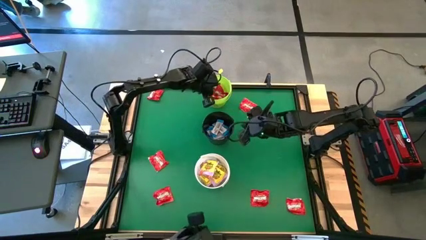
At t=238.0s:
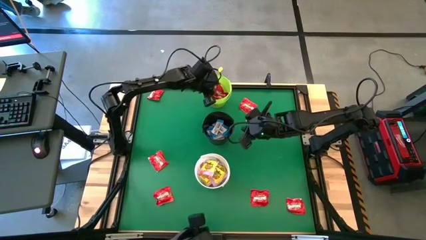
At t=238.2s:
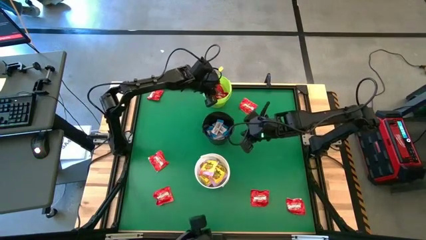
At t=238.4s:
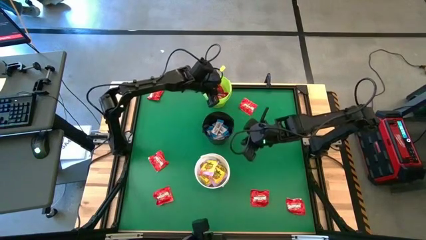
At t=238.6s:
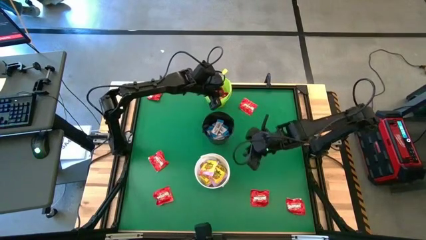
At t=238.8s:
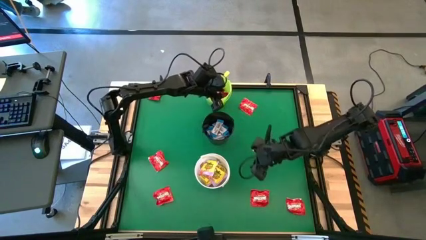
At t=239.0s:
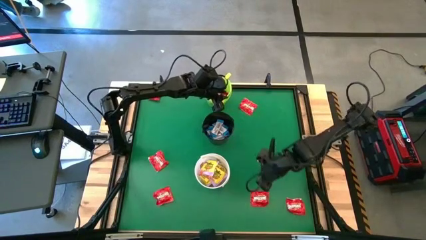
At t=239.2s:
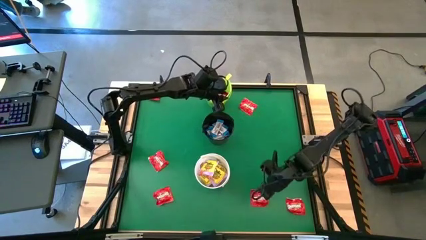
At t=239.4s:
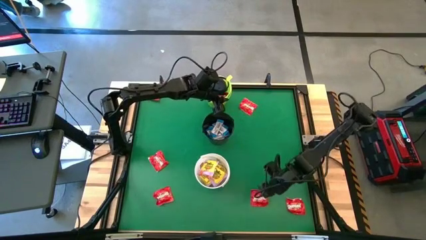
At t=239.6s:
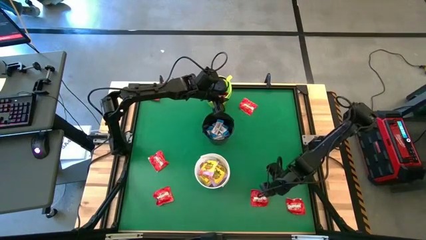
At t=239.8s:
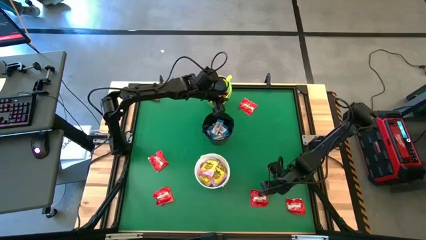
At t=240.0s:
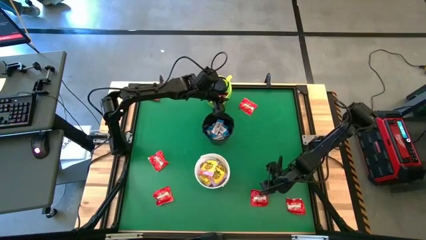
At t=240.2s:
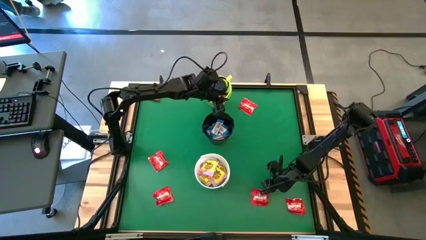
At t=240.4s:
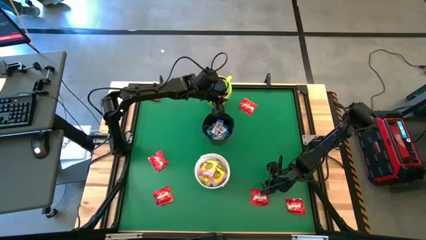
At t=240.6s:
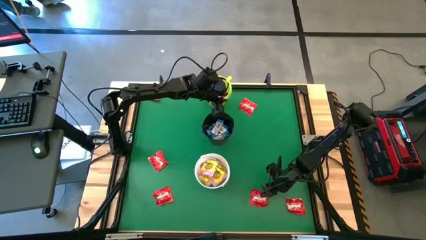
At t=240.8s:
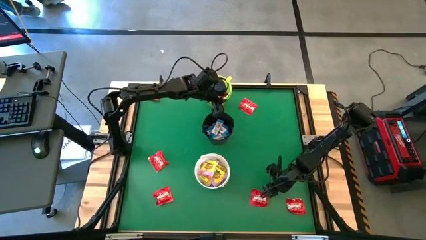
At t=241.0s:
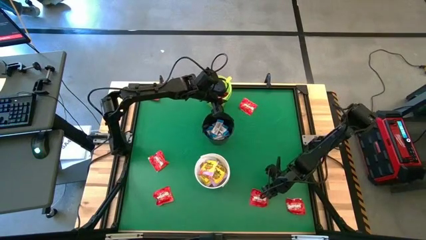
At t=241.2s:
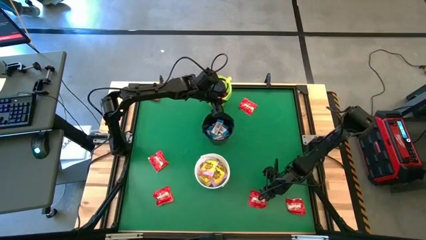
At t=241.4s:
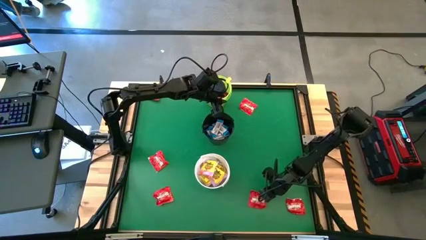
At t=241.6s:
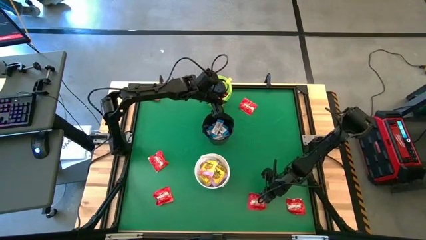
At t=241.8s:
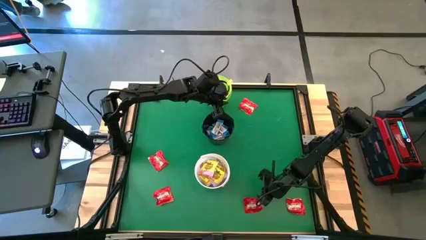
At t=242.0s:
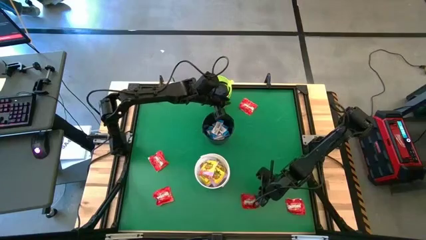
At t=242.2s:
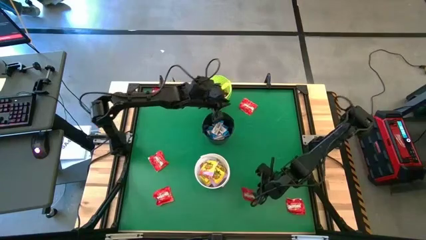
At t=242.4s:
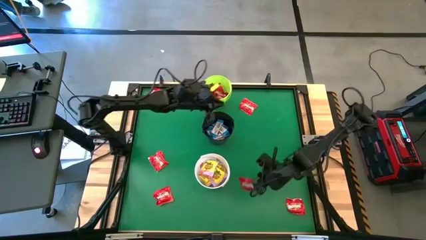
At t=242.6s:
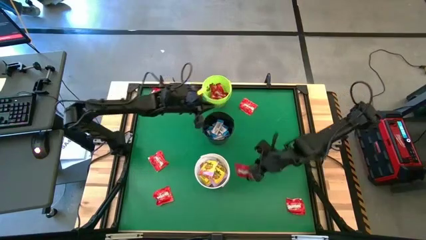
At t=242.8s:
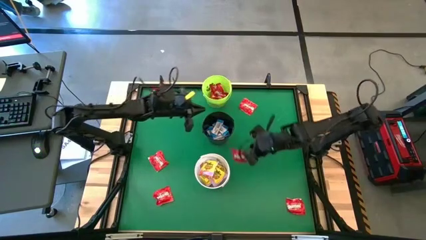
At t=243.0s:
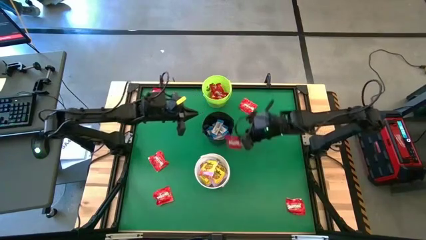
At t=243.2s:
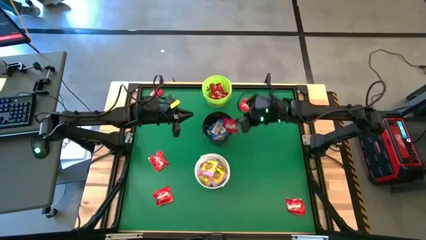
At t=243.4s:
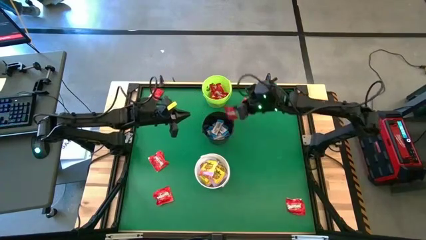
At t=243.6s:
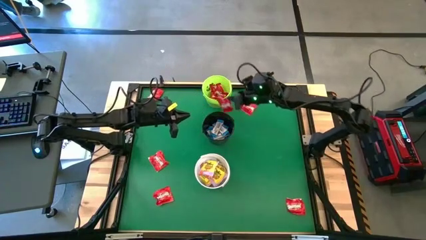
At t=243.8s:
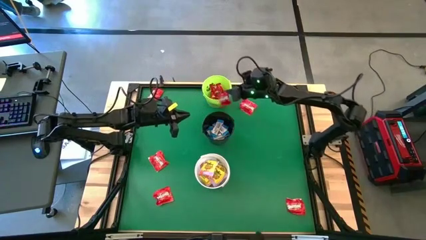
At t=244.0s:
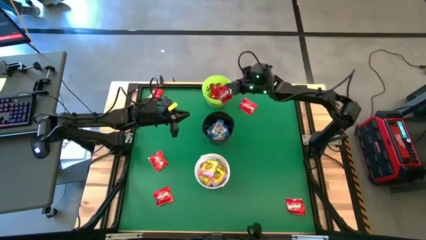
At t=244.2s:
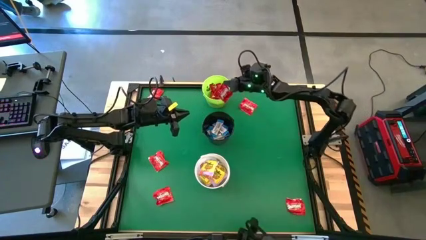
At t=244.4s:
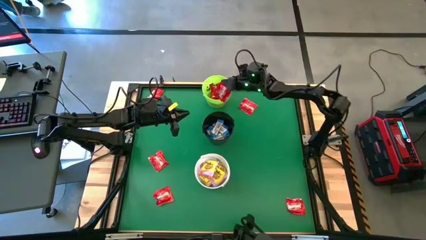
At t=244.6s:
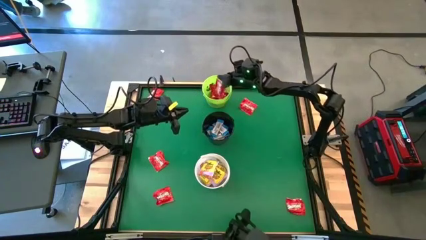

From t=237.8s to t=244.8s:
Task: Sort candy by brand, put in halloween buckets
Put the red candy into the green bucket

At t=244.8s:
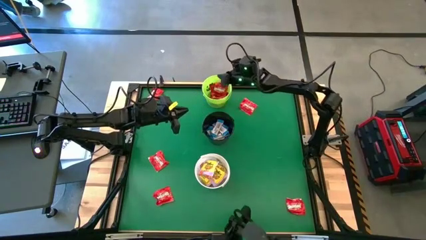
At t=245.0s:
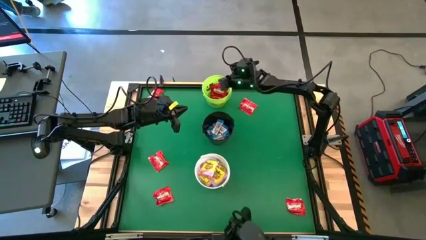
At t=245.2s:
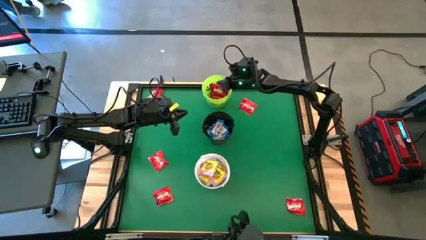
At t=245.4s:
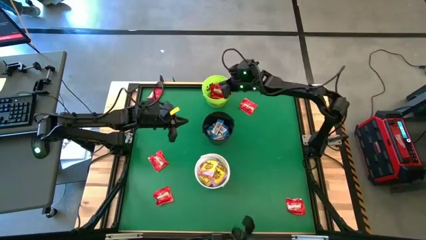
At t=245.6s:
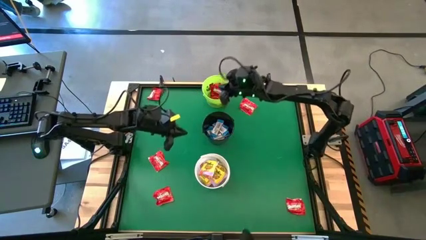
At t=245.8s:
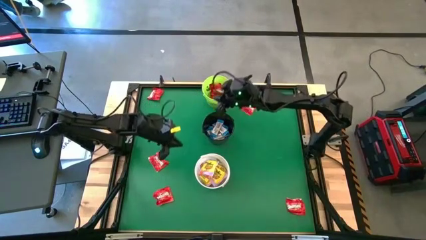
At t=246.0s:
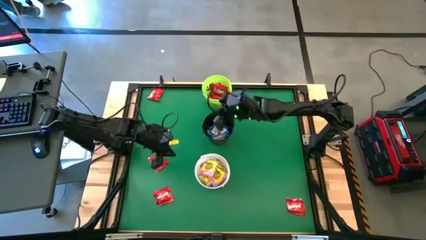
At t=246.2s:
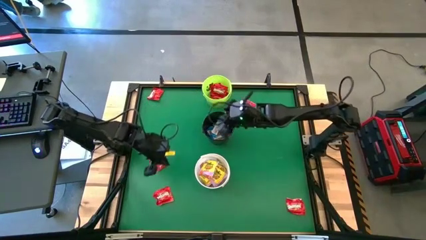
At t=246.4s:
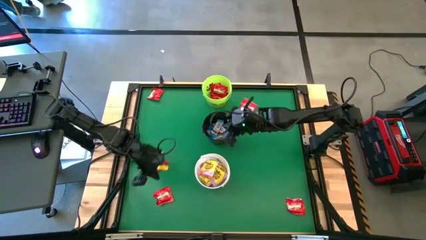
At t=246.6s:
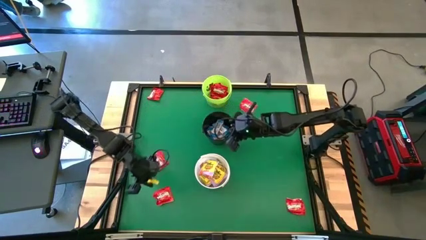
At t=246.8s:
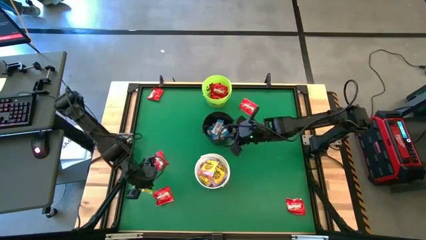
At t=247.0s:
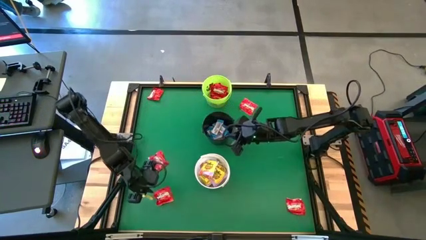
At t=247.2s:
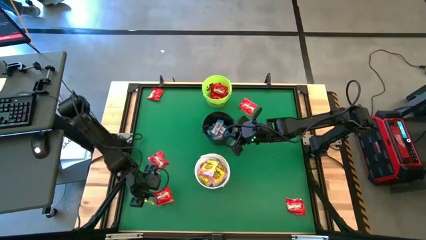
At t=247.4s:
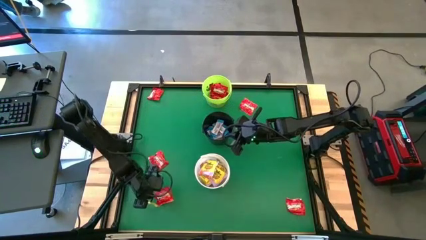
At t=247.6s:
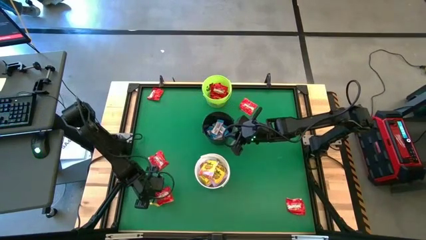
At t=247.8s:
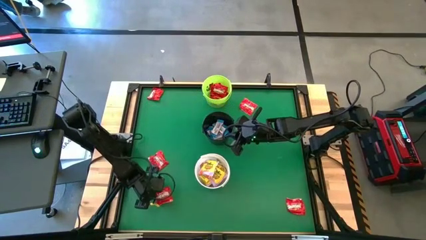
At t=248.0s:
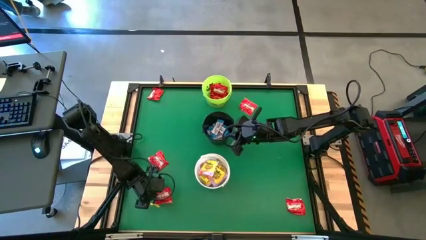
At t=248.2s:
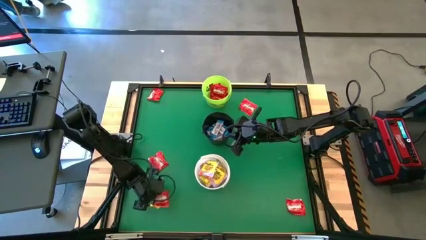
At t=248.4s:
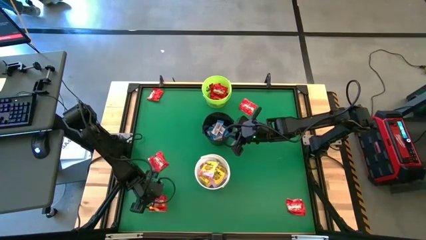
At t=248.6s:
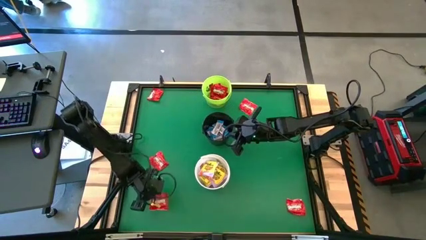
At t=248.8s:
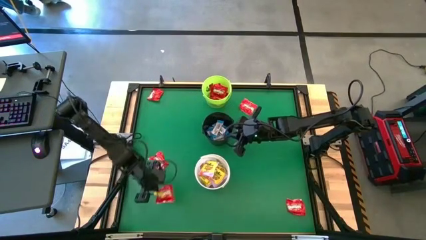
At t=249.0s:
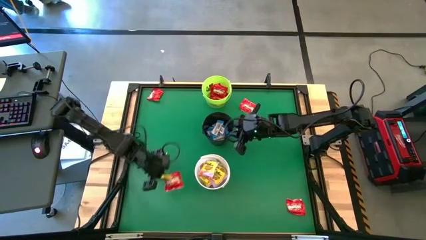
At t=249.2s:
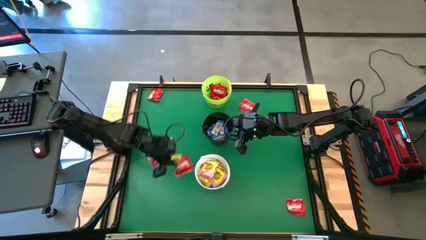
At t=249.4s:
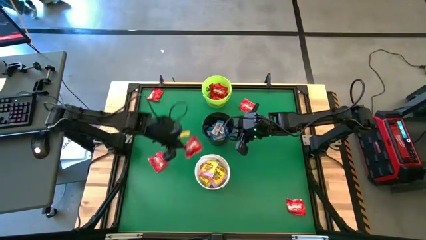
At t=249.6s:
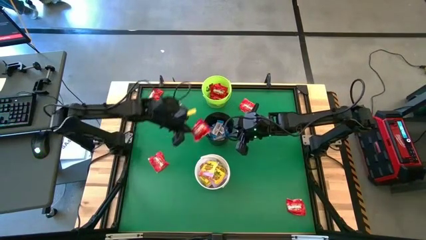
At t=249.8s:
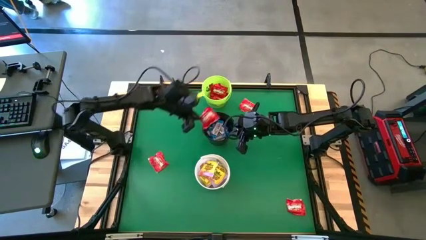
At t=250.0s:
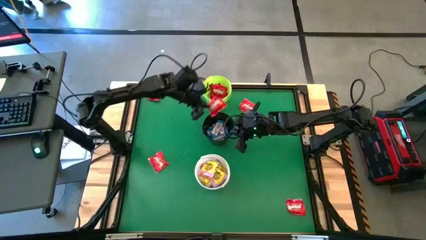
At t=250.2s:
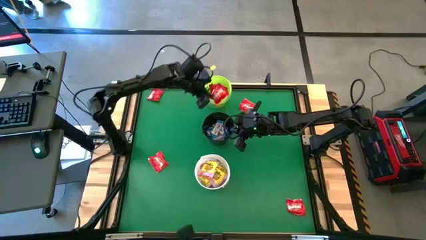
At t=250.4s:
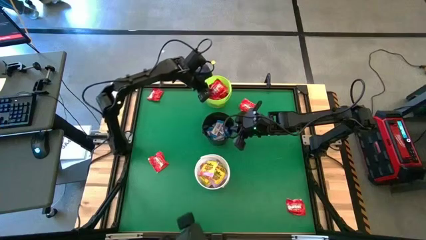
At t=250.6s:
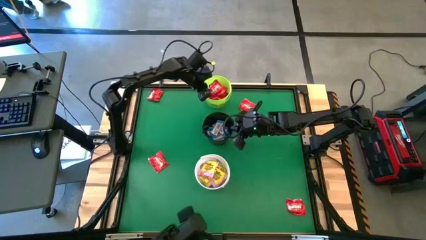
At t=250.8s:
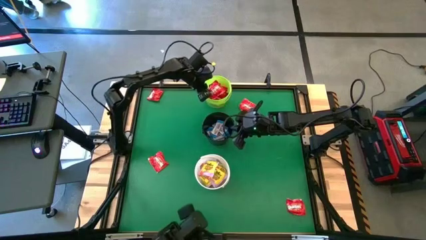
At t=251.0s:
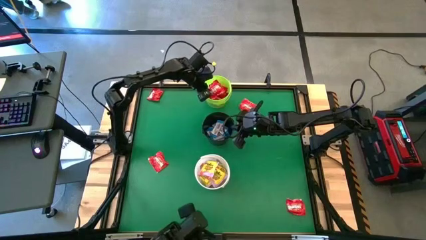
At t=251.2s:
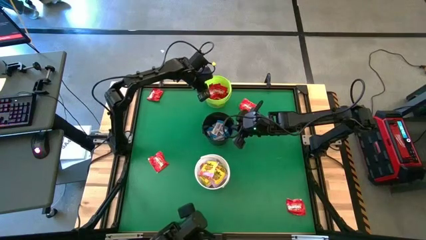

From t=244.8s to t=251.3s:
Put the red candy into the green bucket

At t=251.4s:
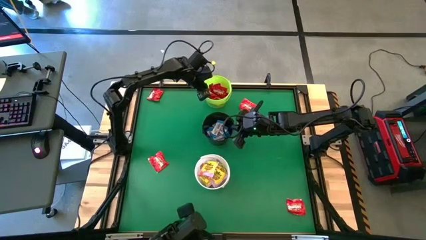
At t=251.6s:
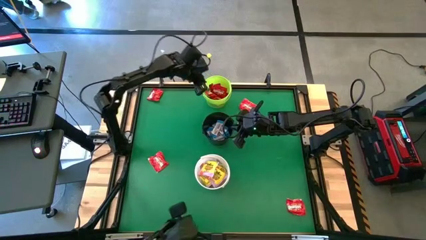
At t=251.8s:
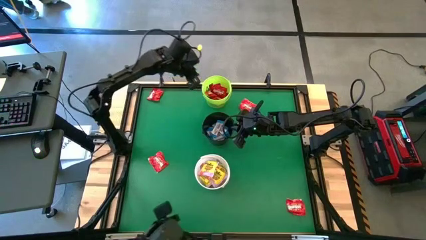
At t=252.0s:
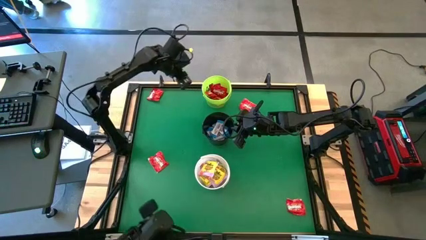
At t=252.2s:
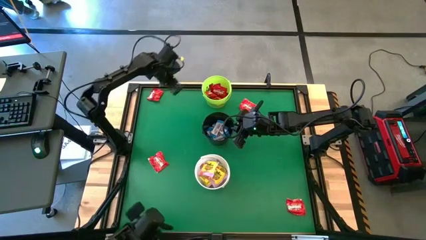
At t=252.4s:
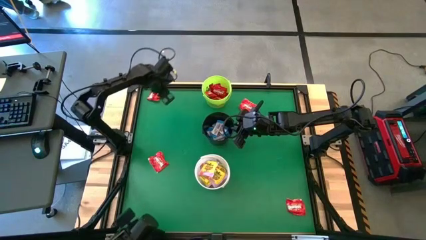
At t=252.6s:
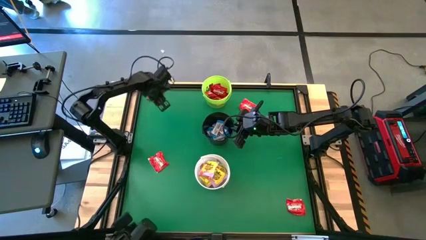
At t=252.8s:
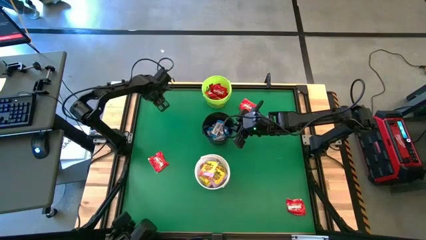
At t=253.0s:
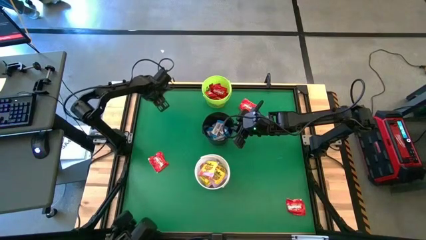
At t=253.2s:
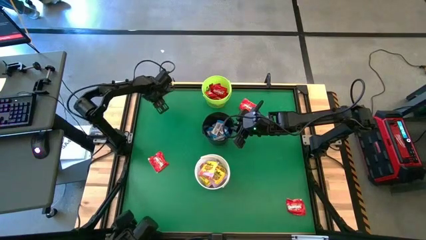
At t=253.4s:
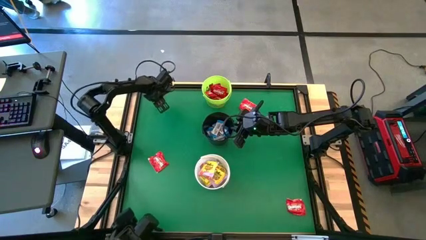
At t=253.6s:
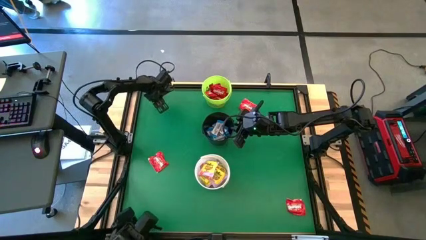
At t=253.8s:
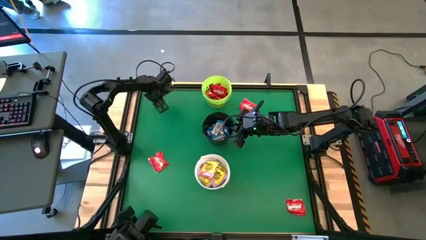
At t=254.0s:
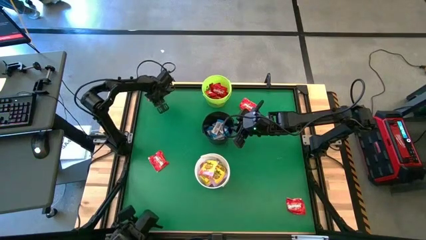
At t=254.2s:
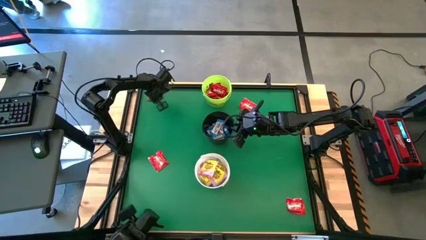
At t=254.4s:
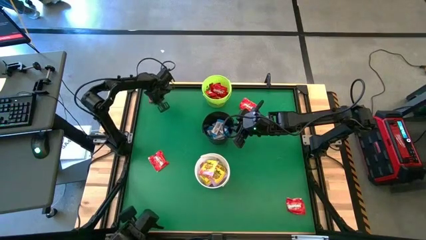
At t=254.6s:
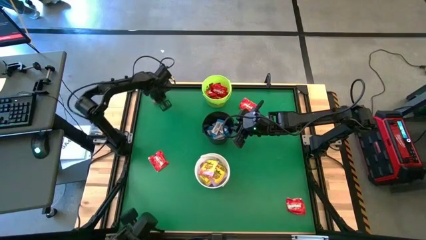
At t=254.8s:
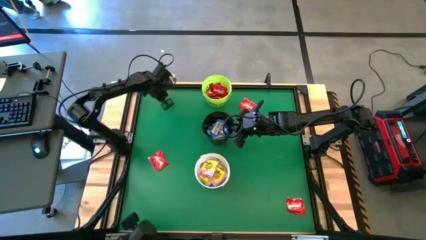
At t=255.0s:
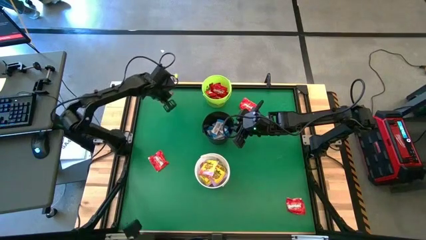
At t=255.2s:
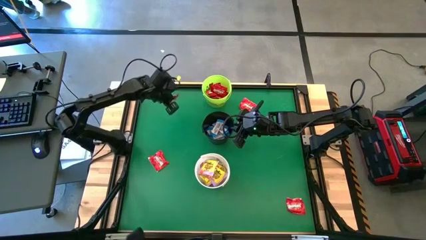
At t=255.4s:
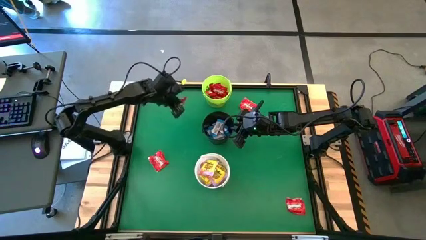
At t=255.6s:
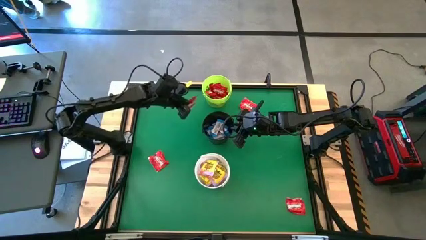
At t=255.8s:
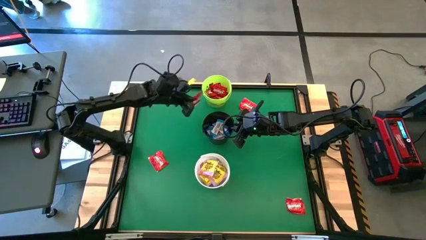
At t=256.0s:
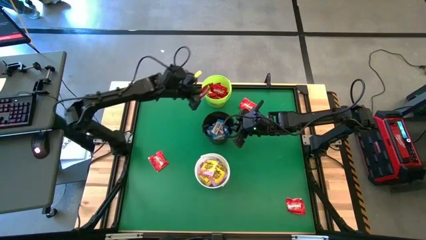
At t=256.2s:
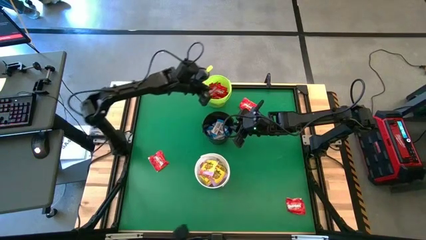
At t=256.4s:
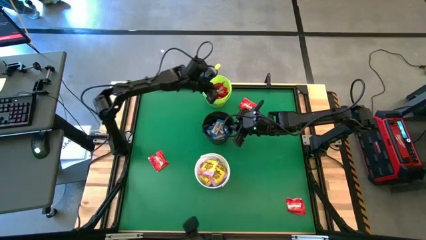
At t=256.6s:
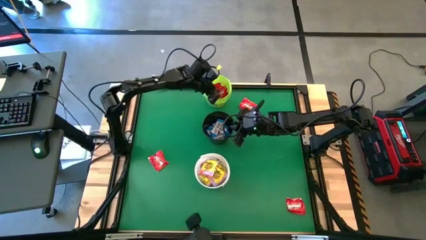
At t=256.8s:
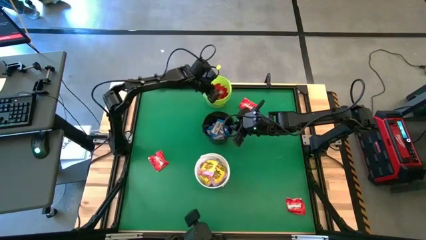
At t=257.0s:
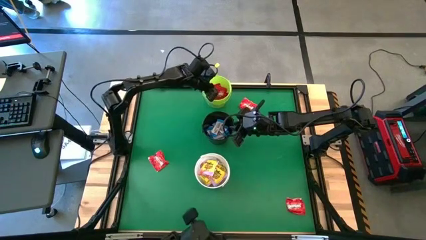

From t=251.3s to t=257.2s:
Put the red candy into the green bucket
